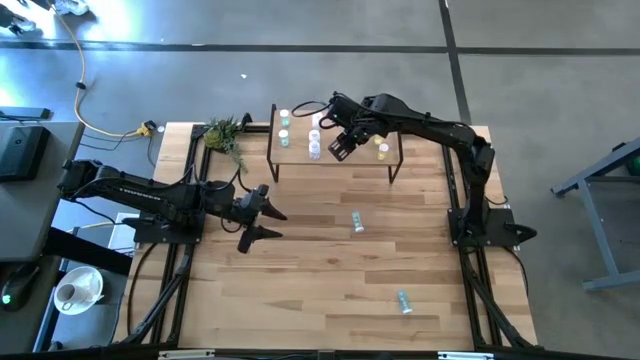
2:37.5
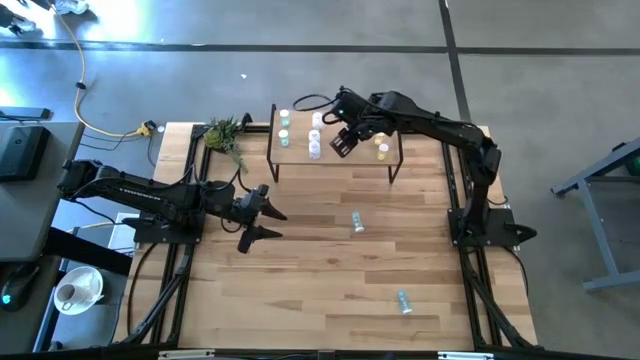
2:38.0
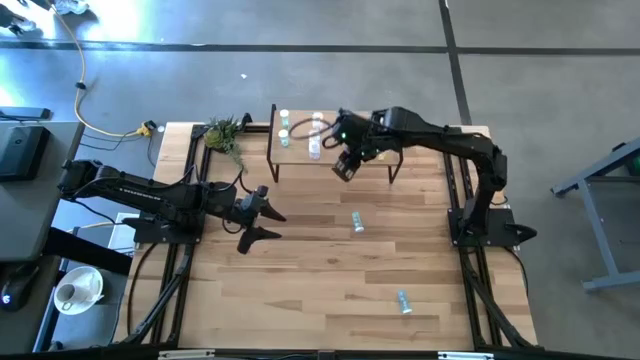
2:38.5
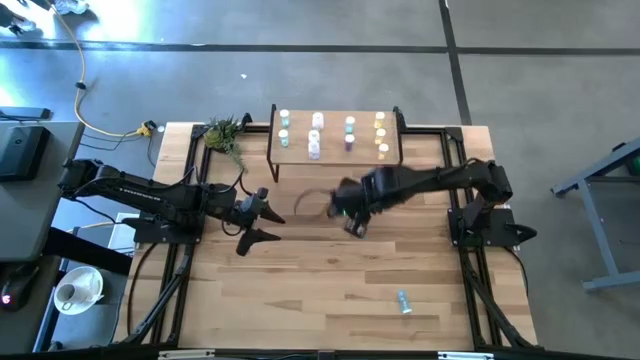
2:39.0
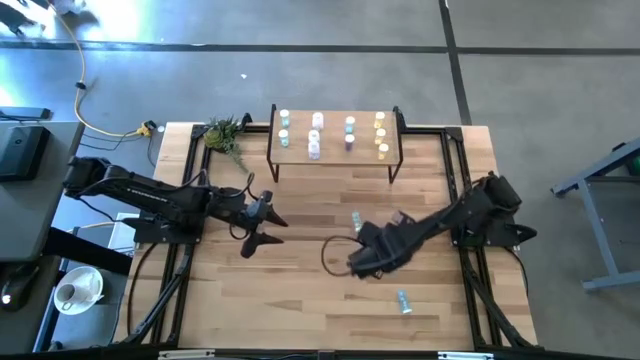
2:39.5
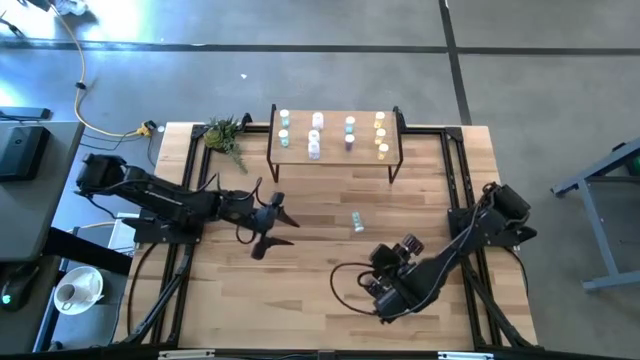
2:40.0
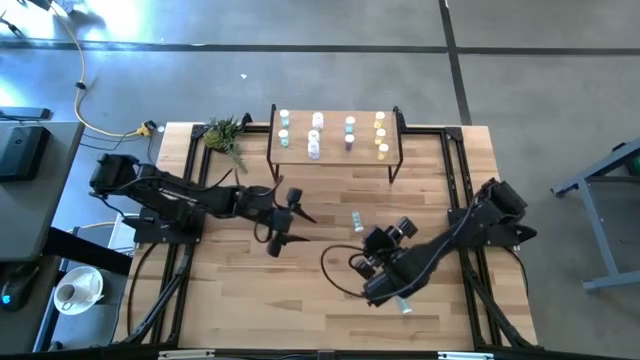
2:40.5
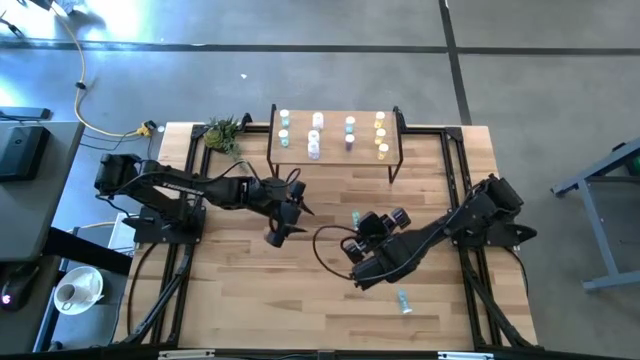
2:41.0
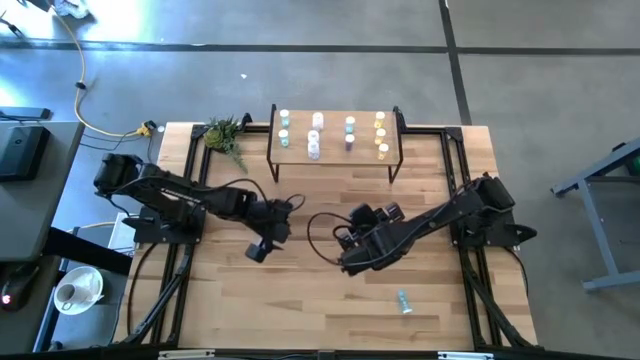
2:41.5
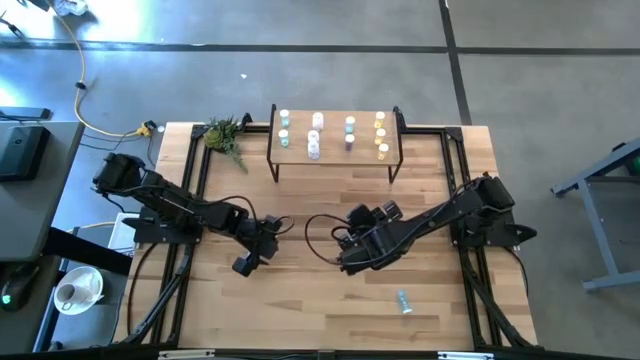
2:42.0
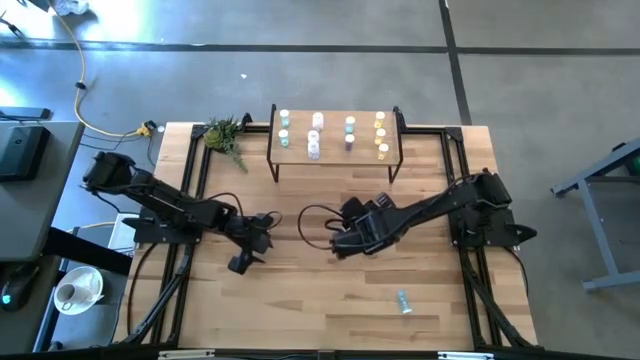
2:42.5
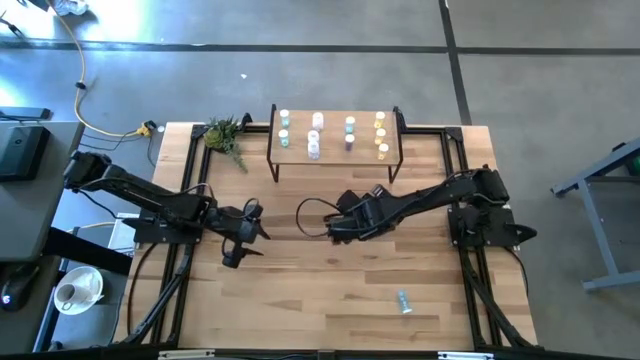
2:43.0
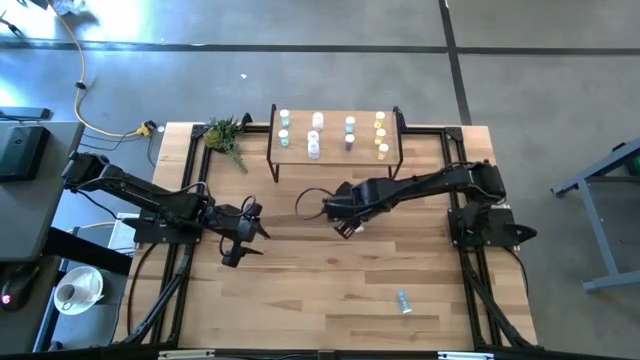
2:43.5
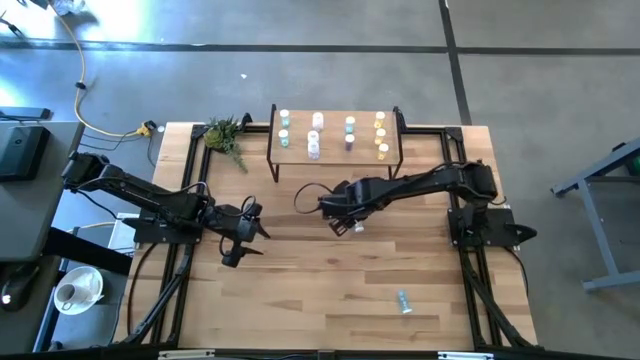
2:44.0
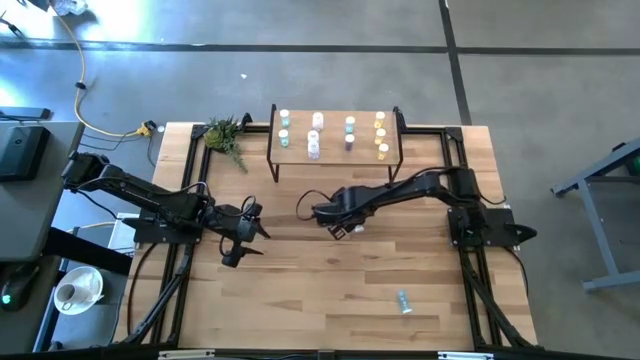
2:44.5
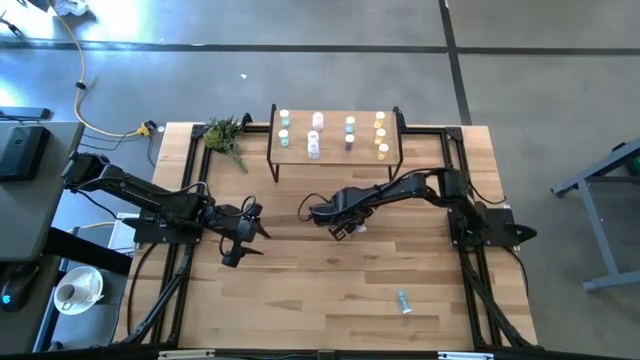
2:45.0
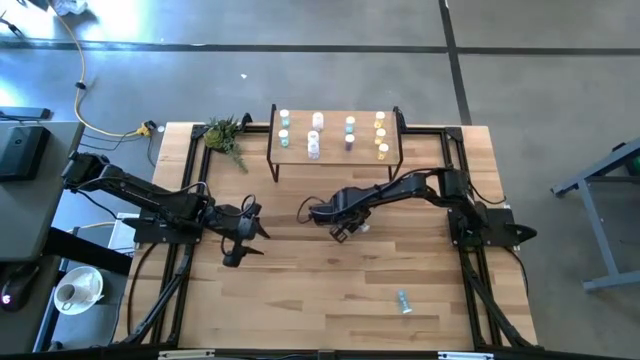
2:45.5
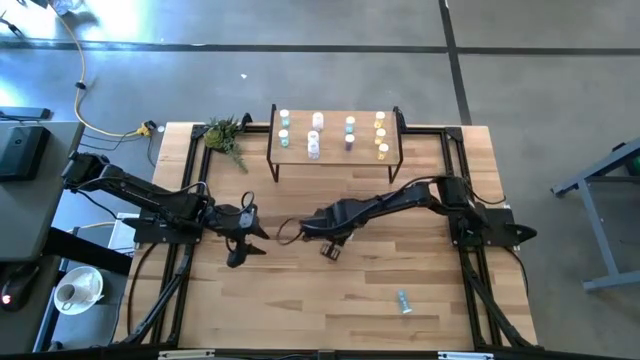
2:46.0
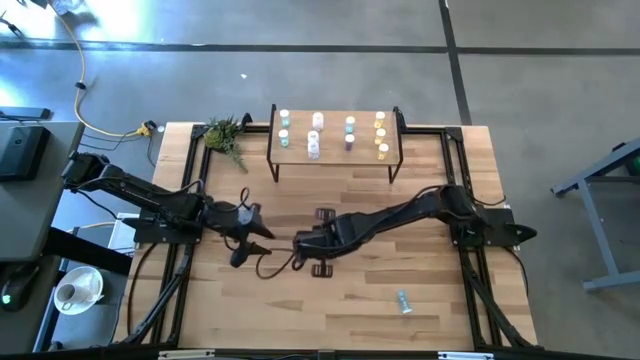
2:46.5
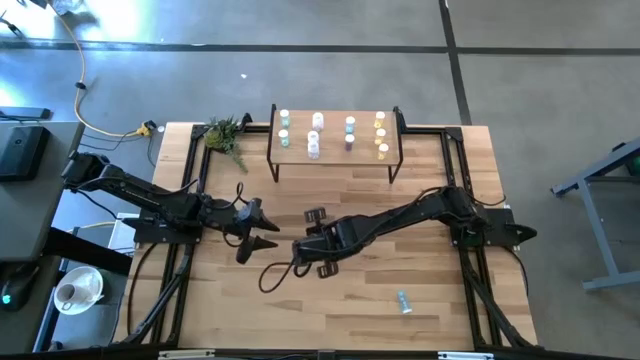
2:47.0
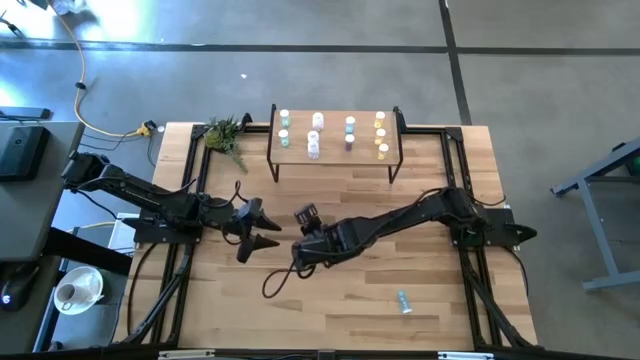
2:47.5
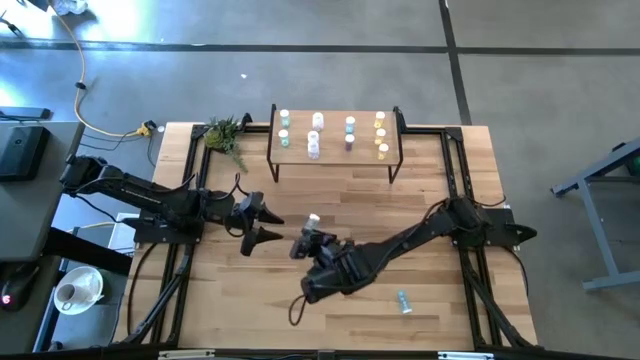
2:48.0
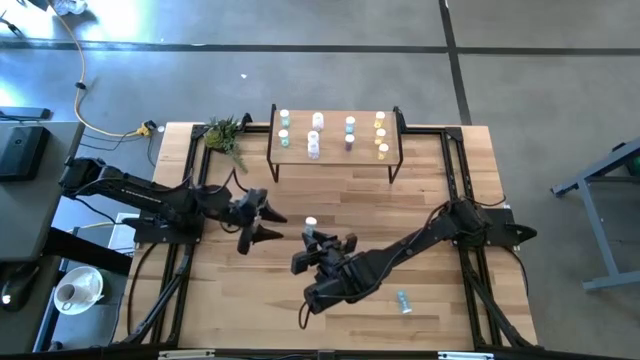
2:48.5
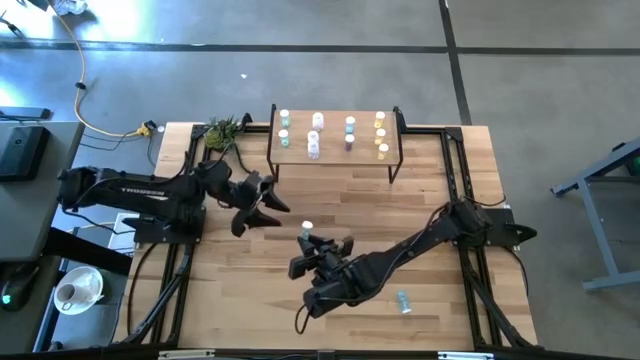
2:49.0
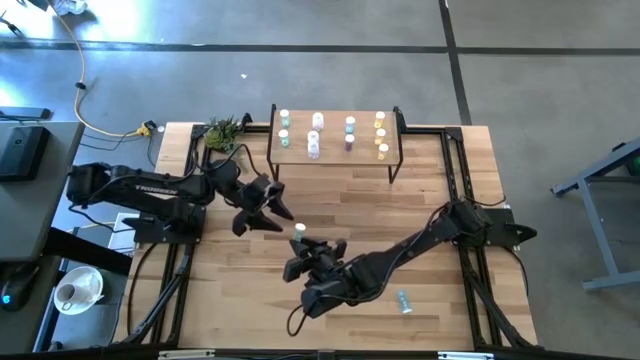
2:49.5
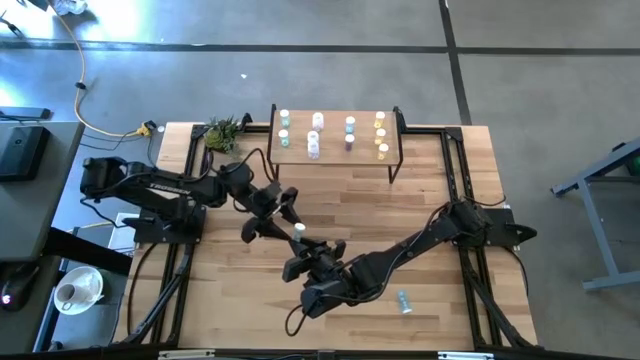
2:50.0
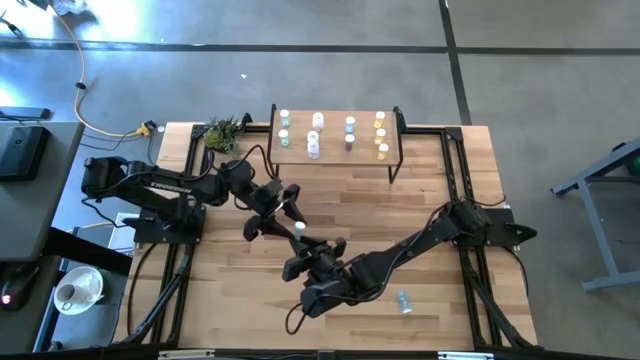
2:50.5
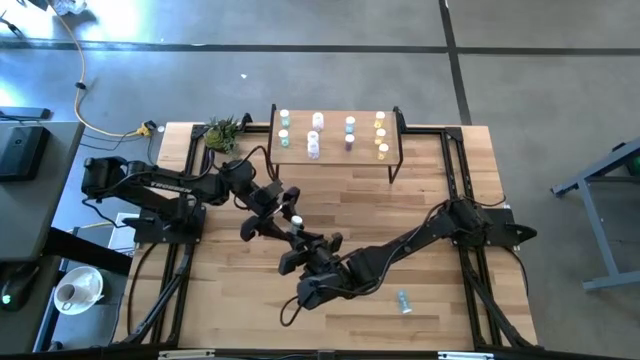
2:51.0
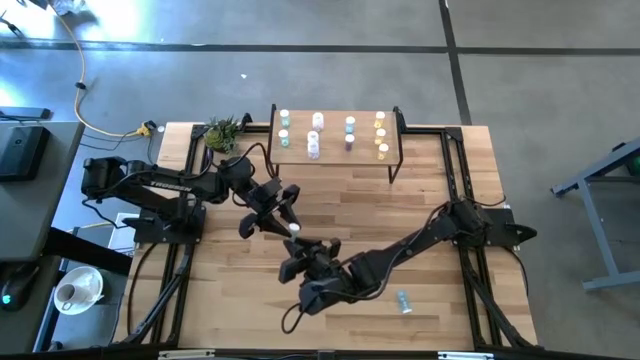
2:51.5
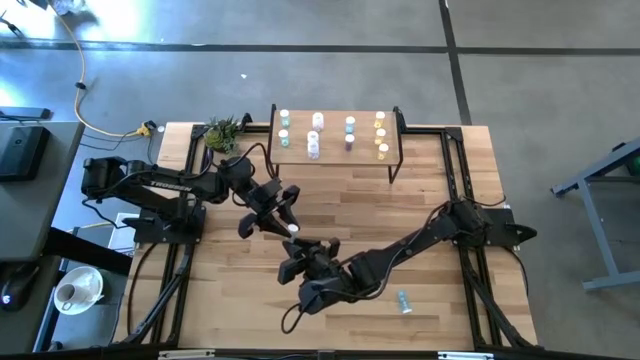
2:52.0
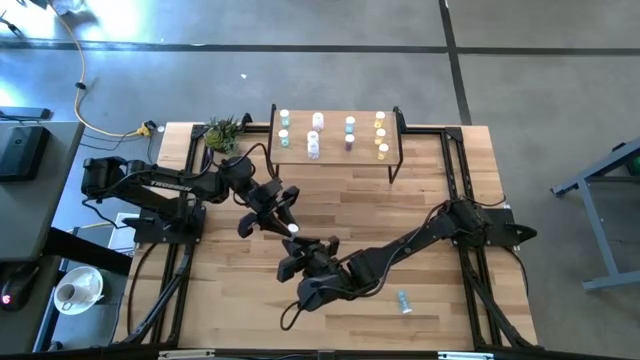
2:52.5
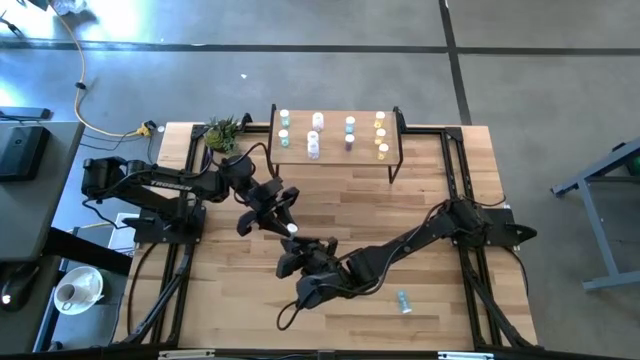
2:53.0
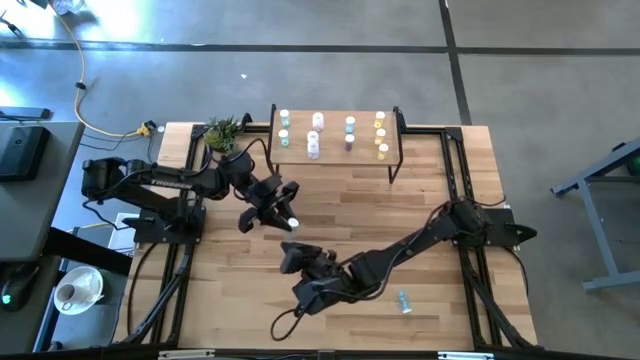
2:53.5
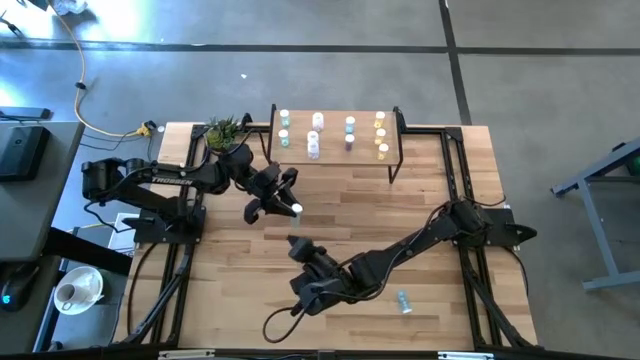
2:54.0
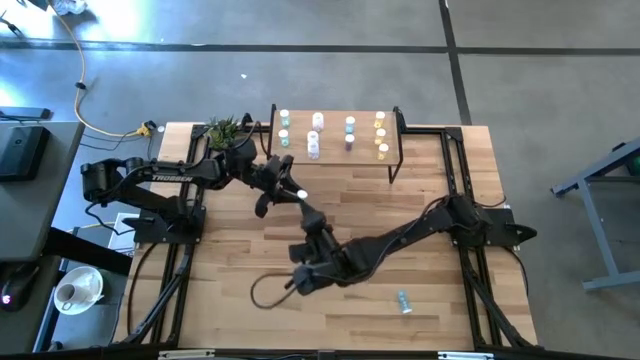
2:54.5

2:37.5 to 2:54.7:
Task: Pick and place medicine bottles onto shelf by color
Put the green pill bottle on the shelf aligned with the other green pill bottle

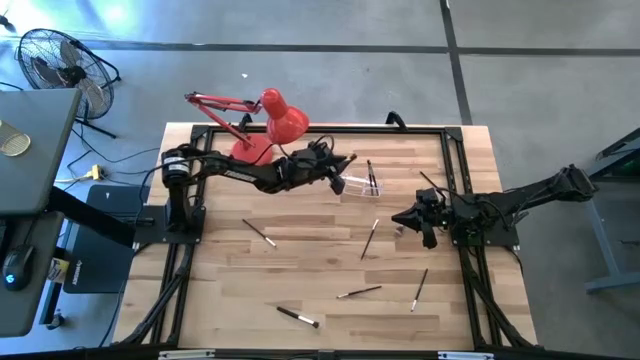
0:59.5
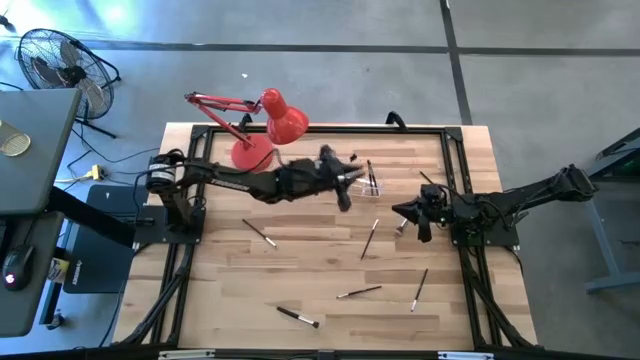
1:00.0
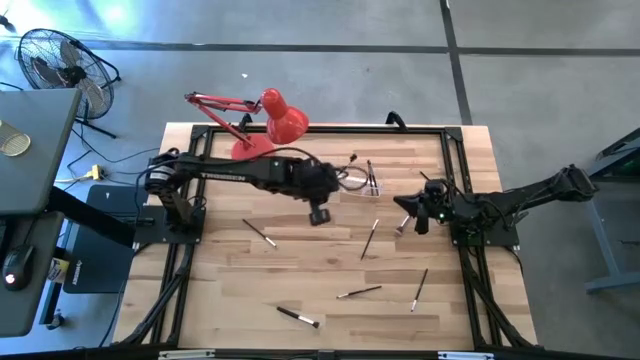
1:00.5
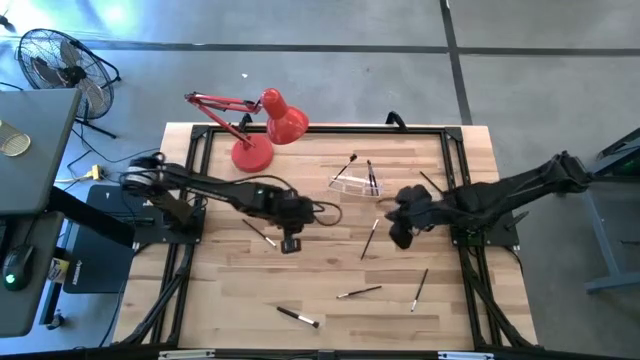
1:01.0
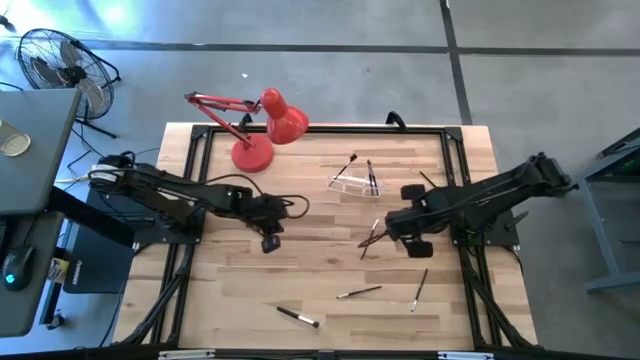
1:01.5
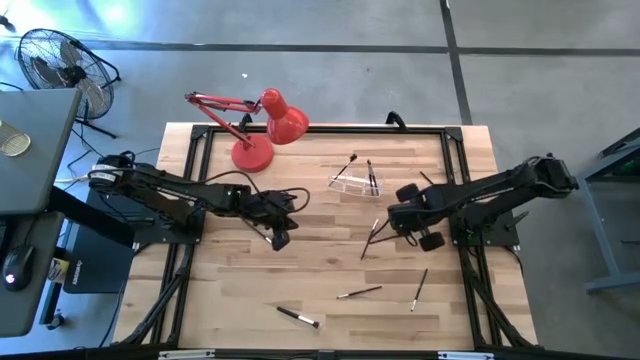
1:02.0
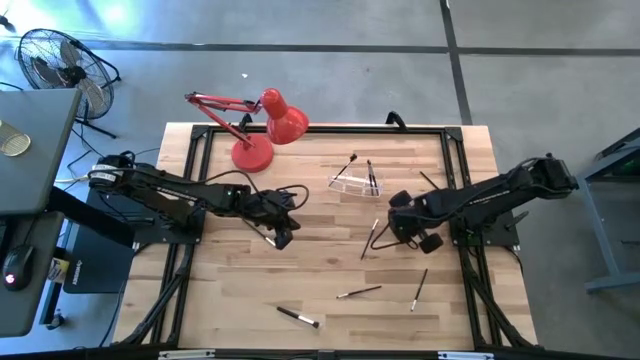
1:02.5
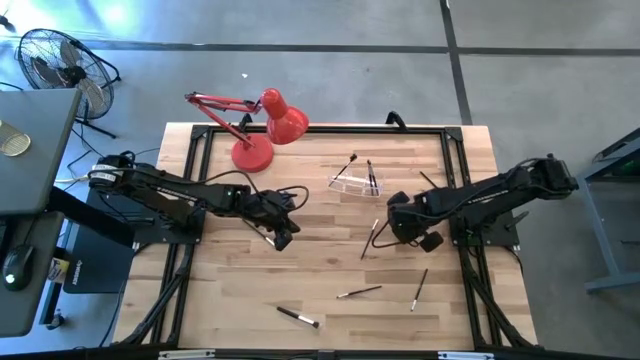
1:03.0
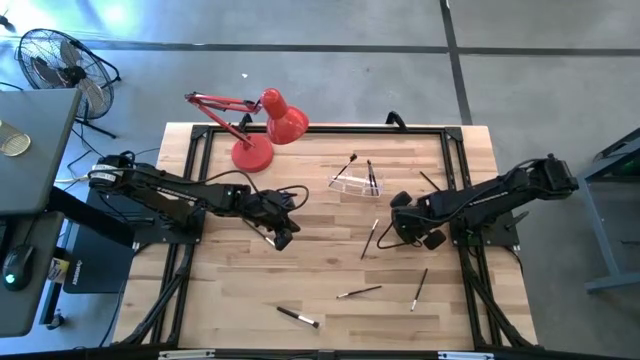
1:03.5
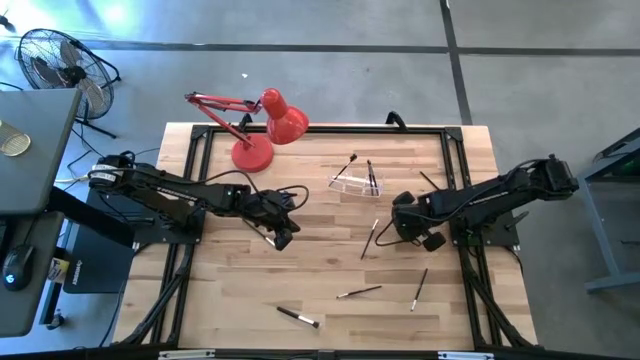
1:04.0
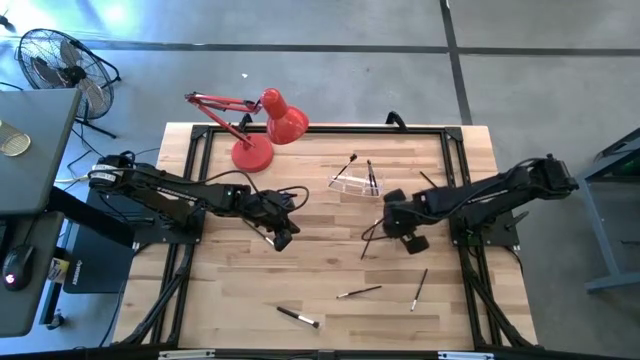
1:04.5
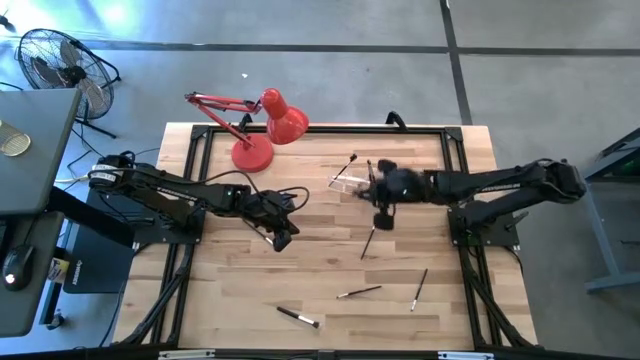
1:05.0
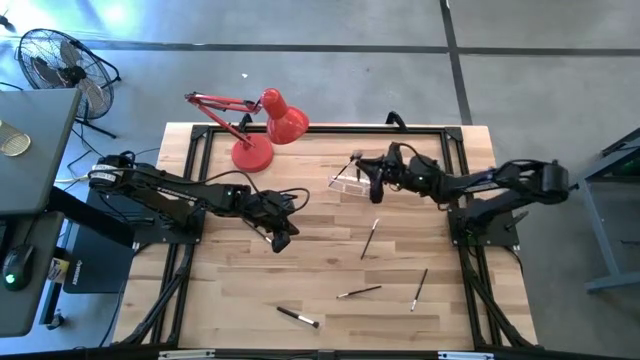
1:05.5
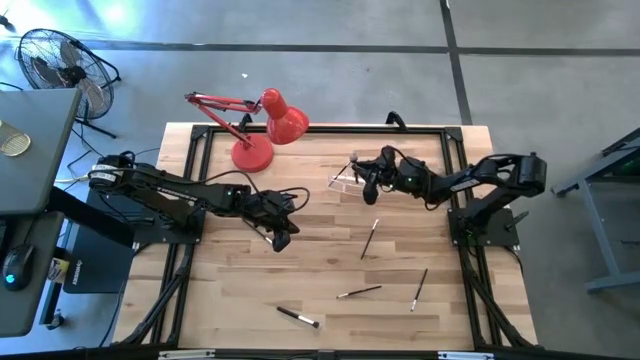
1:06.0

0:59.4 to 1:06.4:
Task: Put items in baskets/containers
Put the powder brush into the transparent organizer
